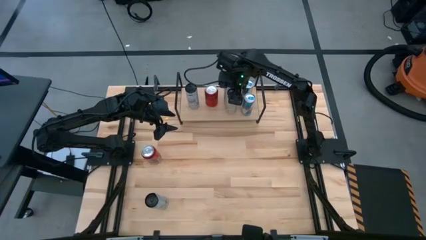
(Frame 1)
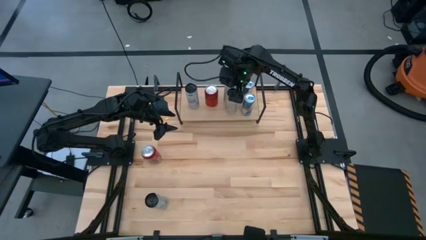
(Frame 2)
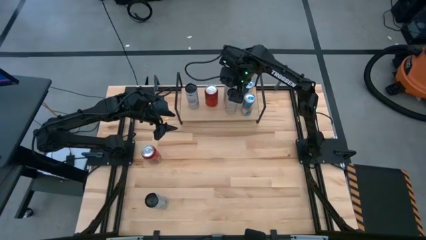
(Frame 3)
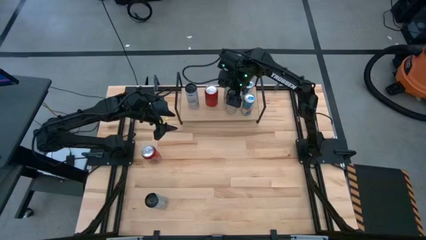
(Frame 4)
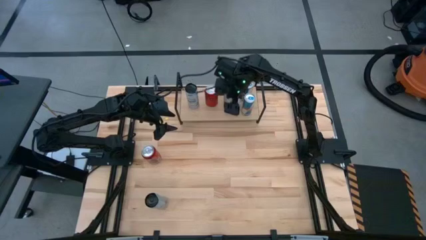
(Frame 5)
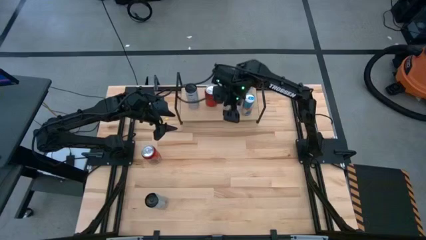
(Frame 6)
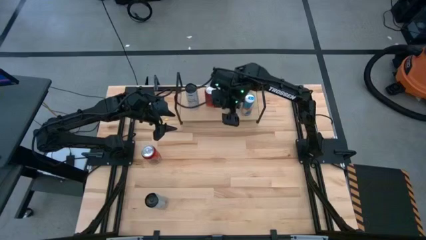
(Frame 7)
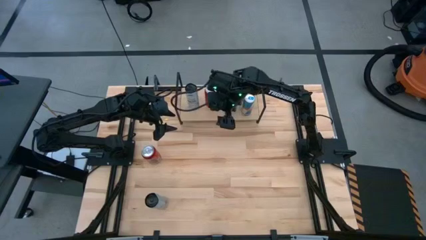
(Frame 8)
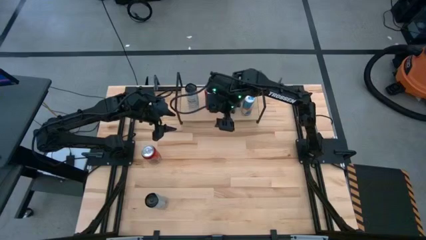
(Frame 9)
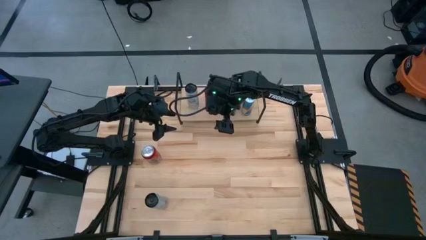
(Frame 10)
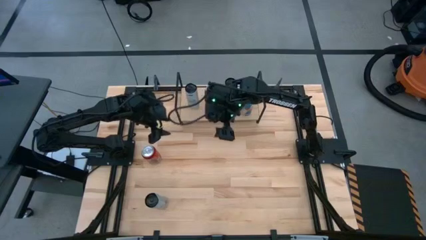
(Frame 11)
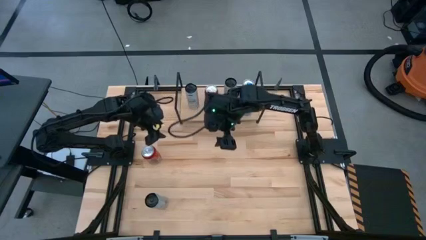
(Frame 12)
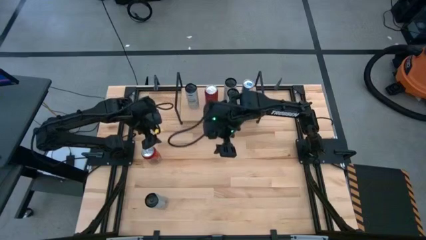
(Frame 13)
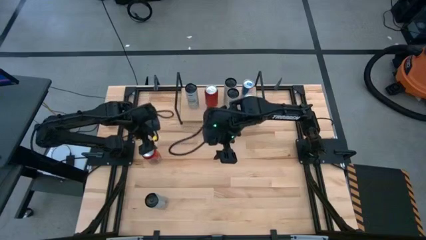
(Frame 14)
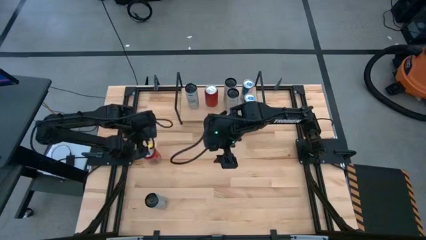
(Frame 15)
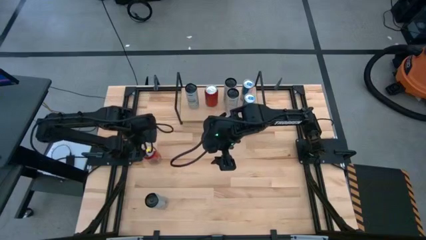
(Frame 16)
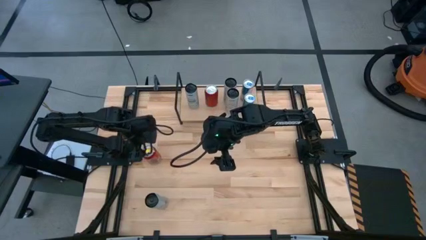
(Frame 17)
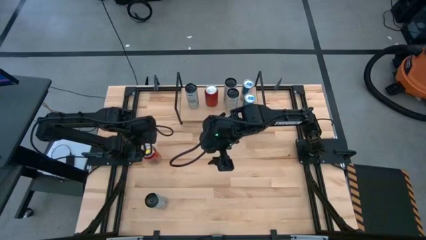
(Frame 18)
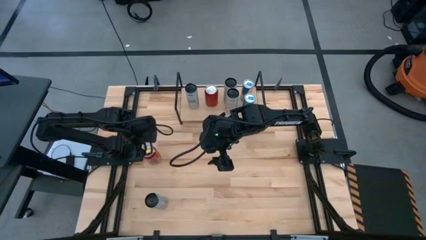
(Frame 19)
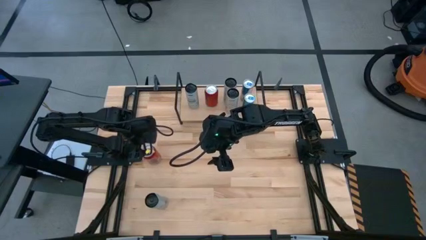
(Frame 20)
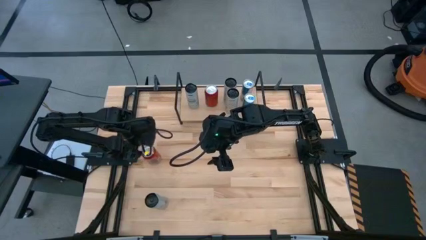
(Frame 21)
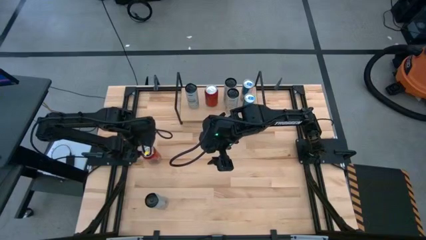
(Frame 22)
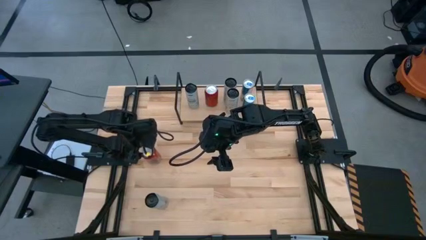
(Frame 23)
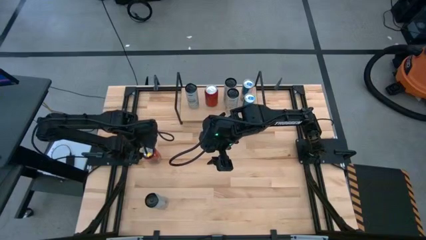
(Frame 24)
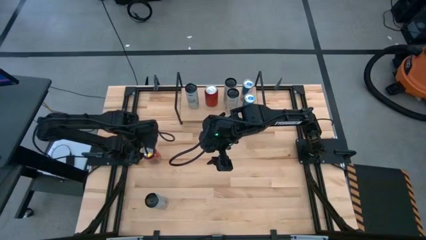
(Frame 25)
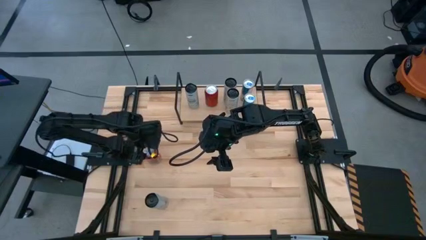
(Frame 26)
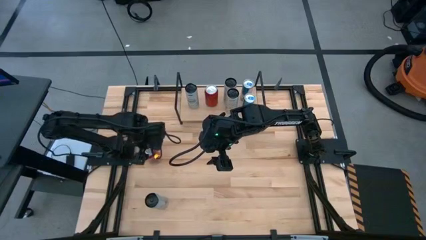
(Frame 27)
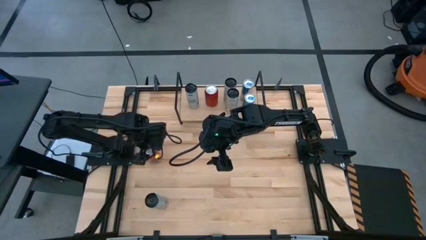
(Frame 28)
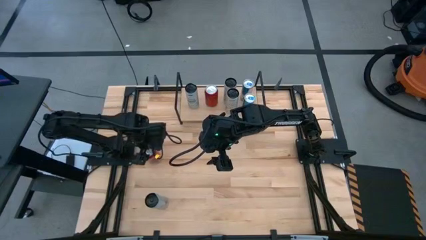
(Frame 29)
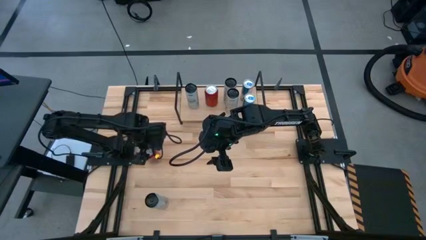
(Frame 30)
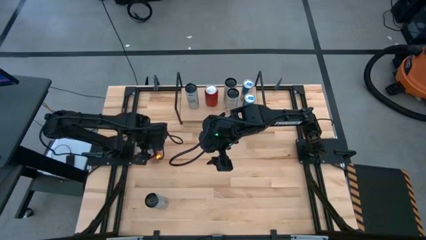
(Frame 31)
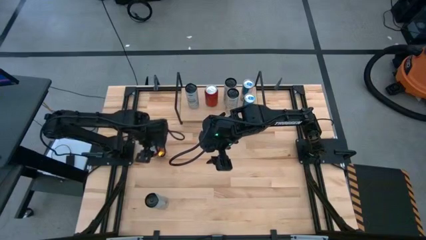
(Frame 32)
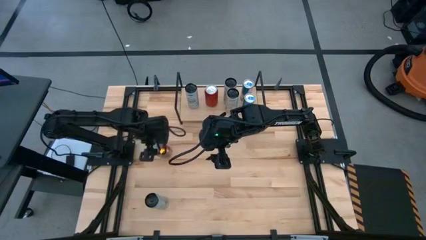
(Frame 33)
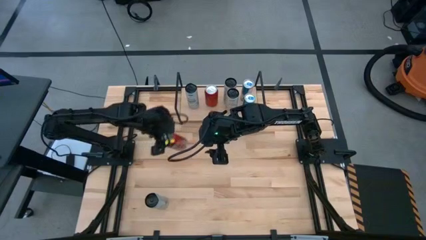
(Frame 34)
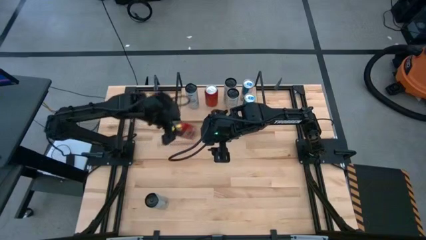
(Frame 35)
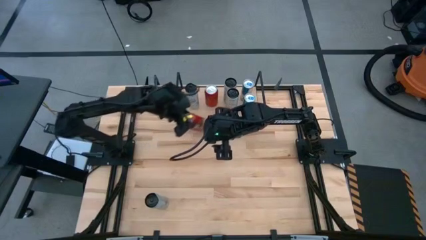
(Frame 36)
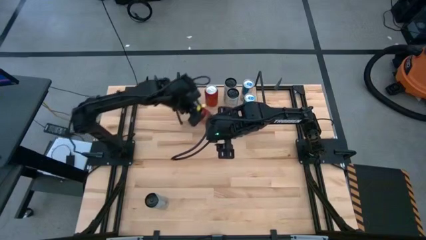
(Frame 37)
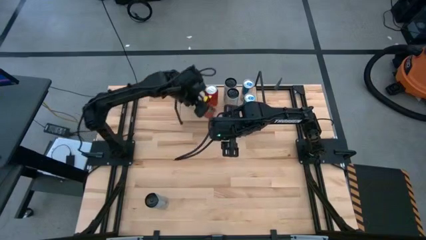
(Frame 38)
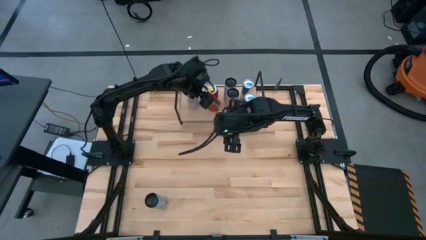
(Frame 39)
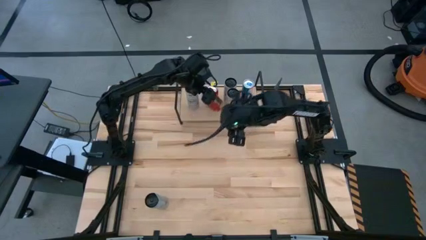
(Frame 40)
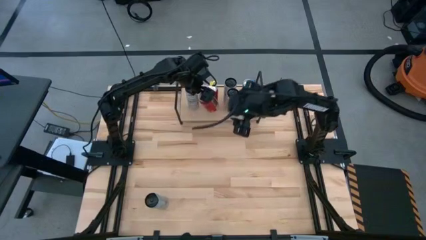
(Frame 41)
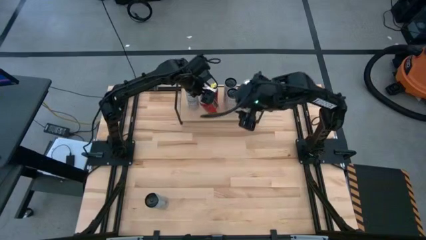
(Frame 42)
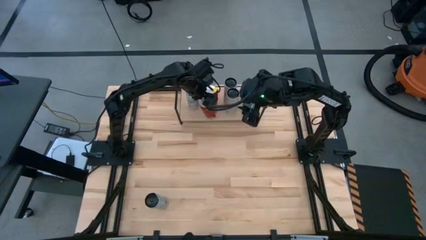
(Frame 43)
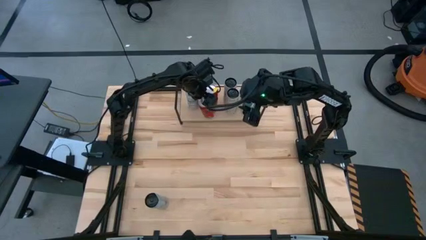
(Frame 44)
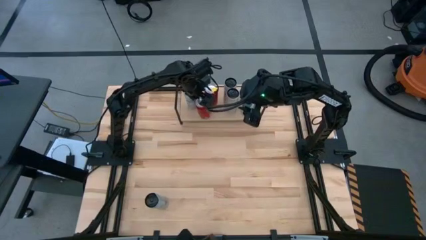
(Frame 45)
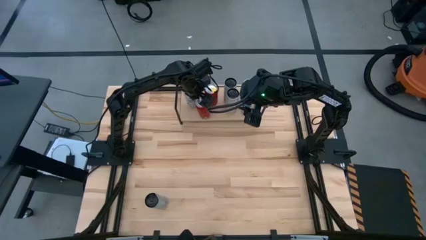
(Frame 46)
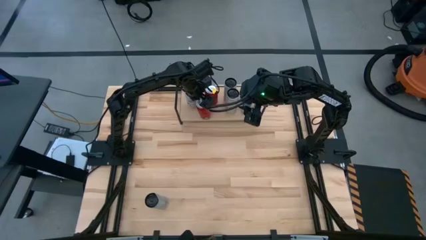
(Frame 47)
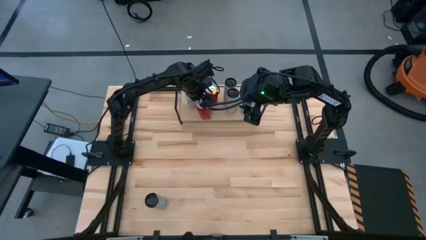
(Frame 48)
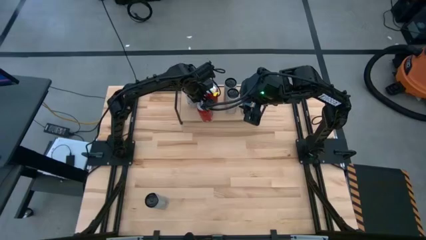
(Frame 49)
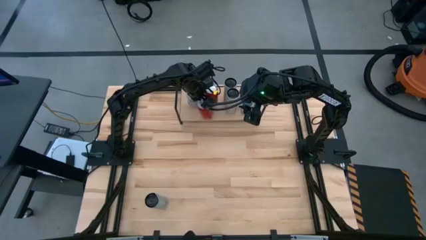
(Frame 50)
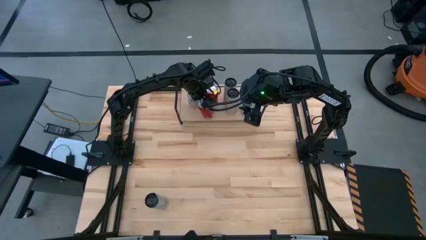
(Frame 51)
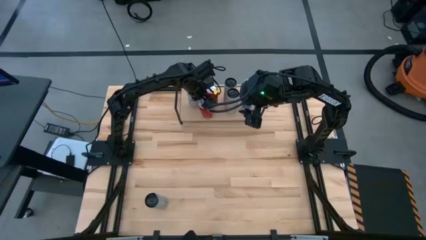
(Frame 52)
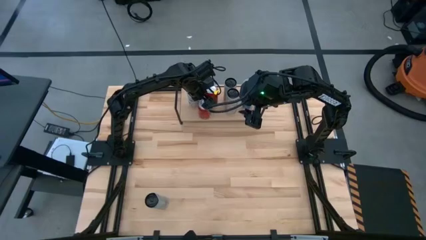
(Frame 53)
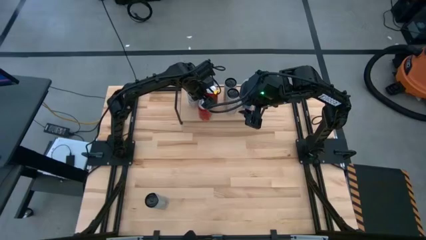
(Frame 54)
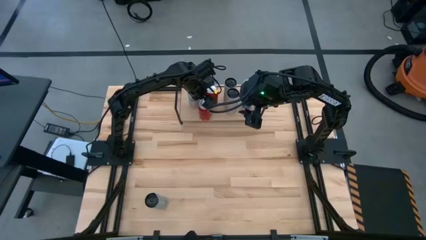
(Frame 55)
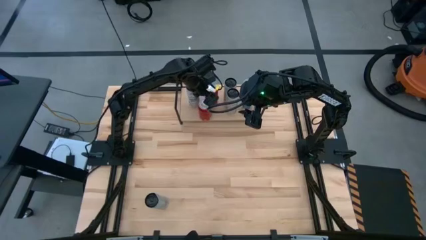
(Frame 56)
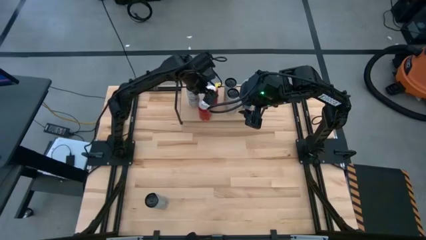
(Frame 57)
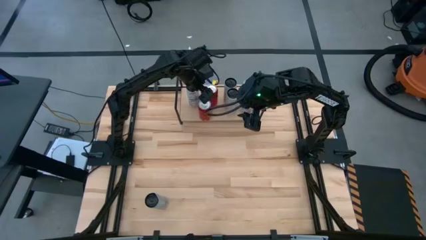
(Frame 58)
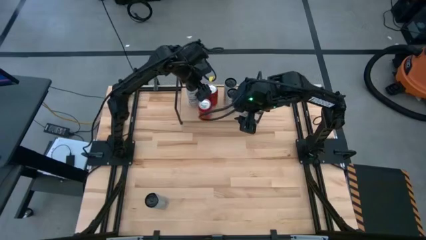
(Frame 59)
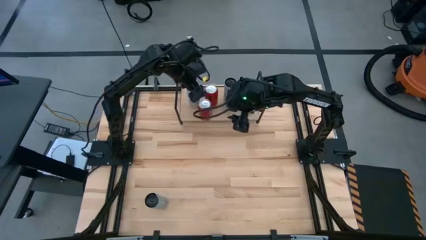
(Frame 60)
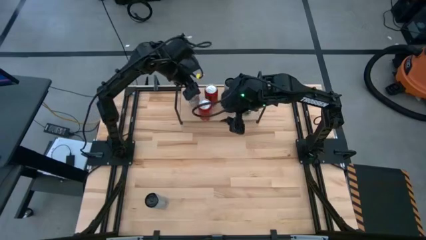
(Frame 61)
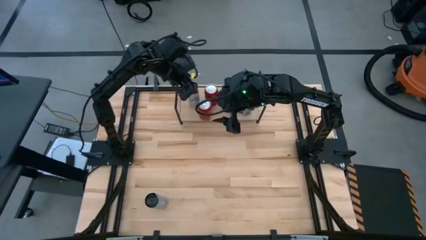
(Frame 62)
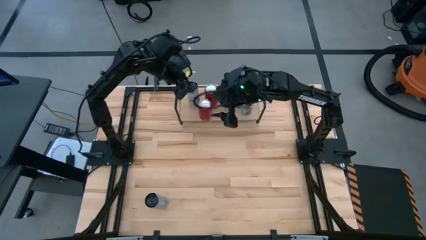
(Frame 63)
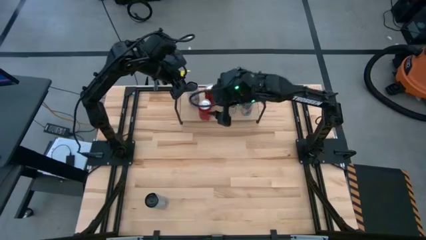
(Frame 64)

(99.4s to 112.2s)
Task: Place canned beverage on shelf
Put the red-black soda can aligned with the other red-black soda can on the shelf

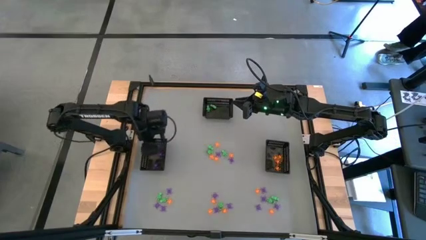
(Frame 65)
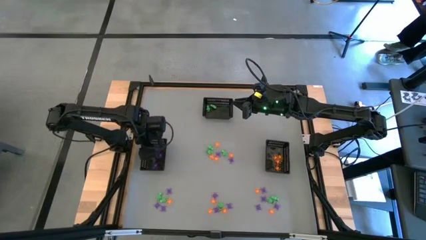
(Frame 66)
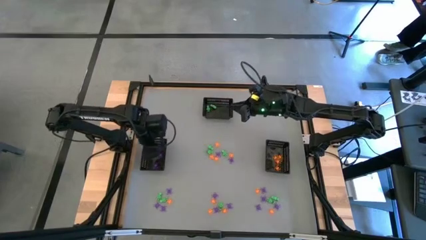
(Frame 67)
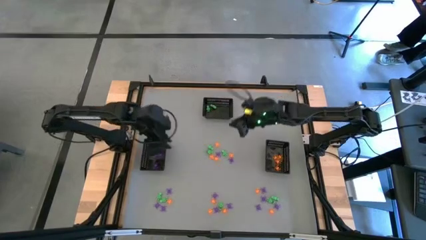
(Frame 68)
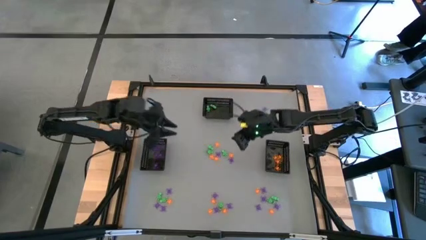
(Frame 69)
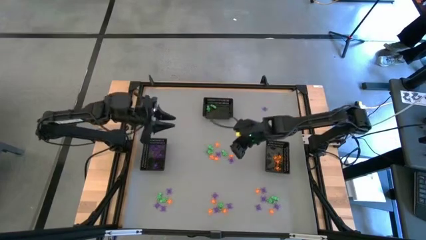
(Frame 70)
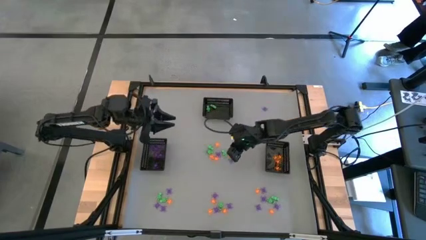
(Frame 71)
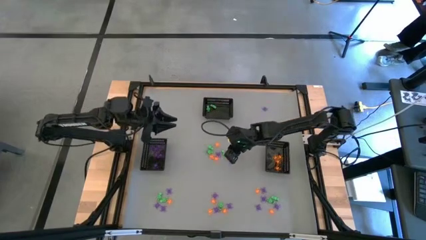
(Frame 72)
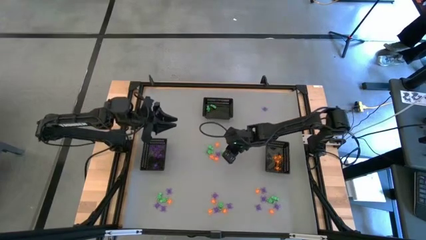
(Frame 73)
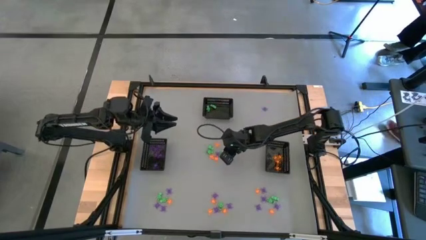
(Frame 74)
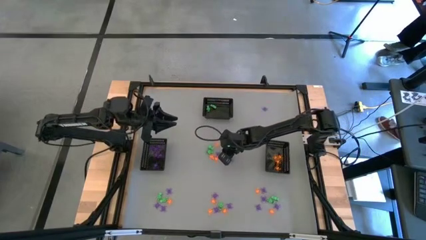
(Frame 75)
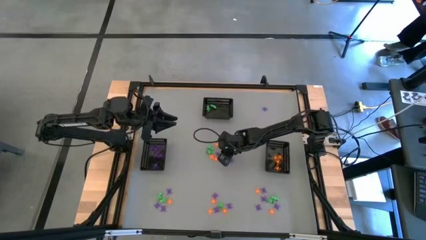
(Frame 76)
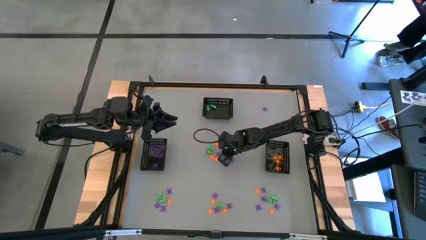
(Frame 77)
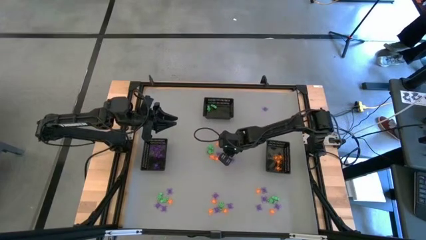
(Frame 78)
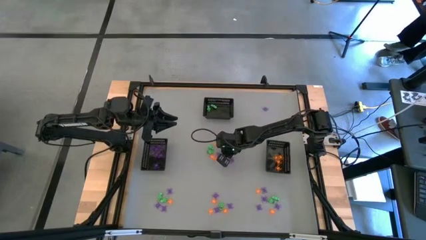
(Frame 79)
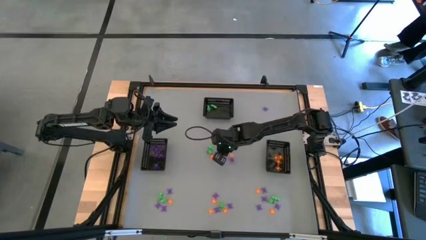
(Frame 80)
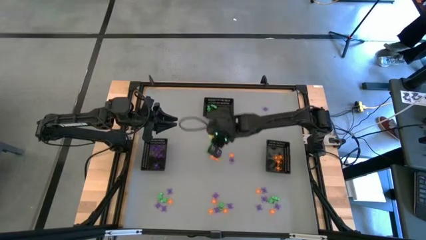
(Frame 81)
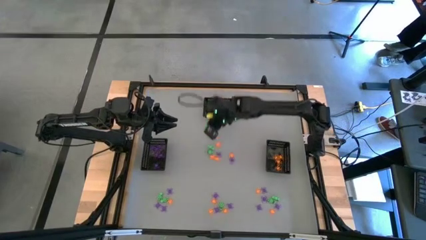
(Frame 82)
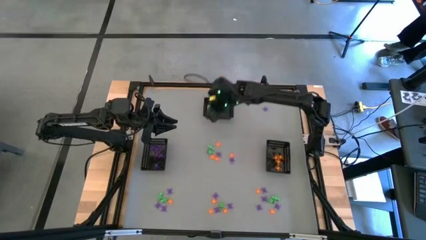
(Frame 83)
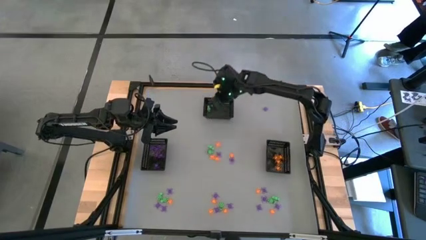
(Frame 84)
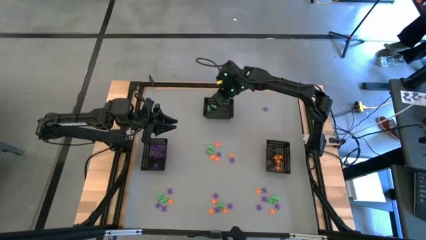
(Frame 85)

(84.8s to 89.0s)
Task: Sort Halloween decoration
Put the green skeleton toy into the top bin
